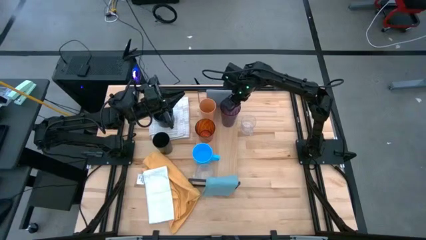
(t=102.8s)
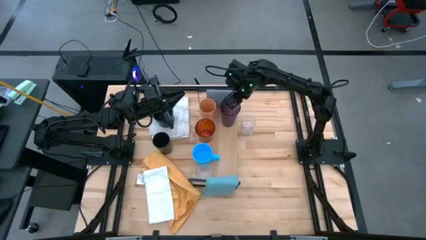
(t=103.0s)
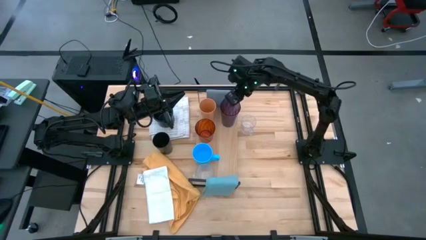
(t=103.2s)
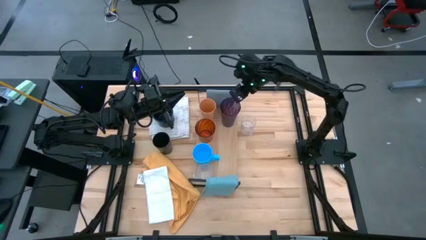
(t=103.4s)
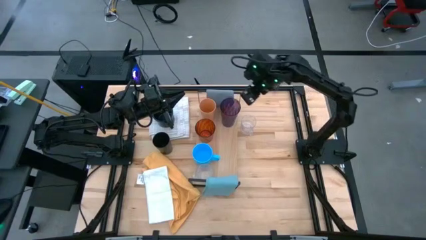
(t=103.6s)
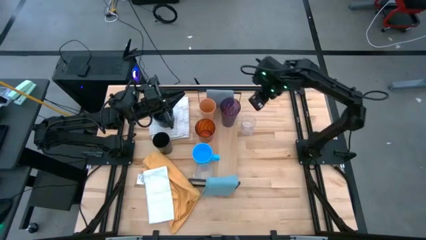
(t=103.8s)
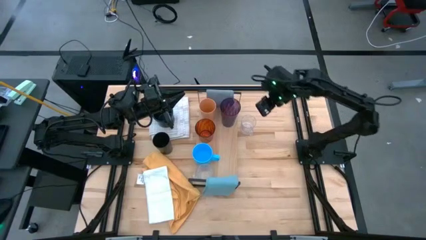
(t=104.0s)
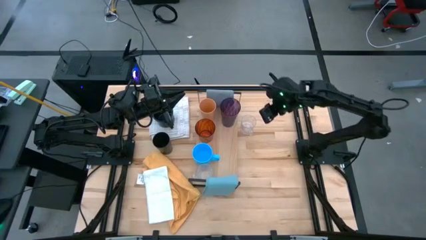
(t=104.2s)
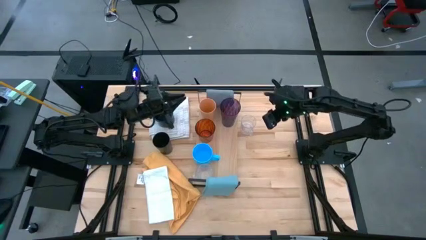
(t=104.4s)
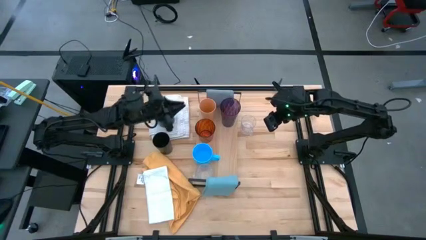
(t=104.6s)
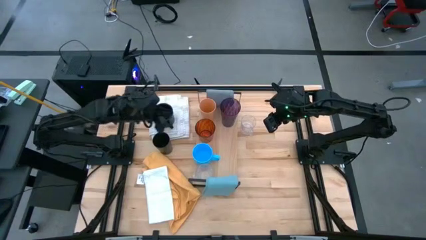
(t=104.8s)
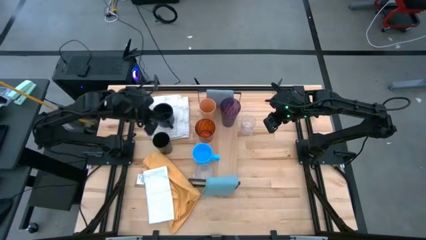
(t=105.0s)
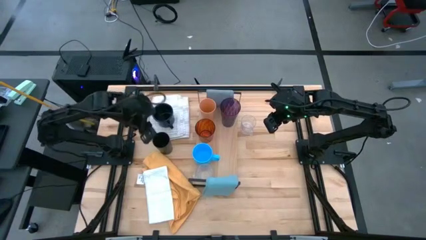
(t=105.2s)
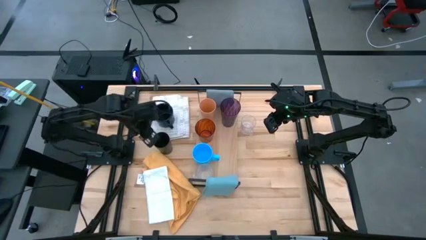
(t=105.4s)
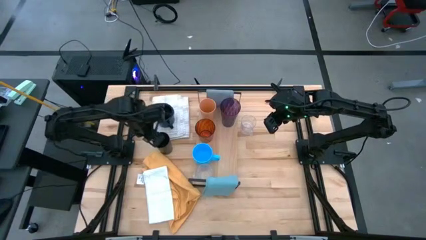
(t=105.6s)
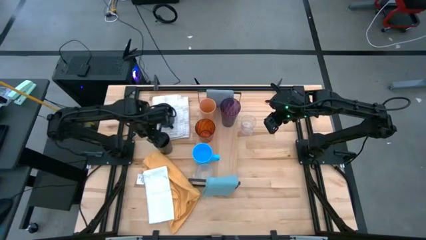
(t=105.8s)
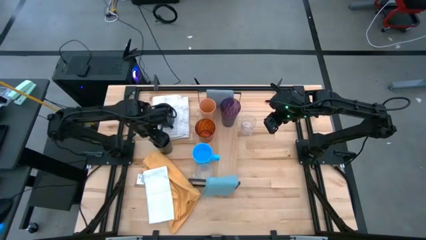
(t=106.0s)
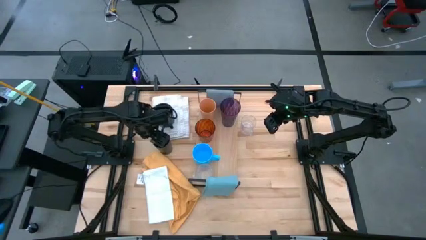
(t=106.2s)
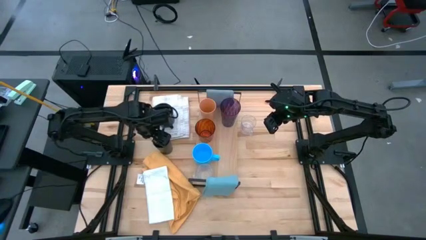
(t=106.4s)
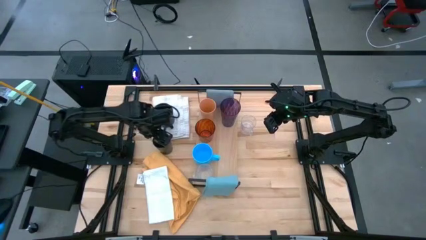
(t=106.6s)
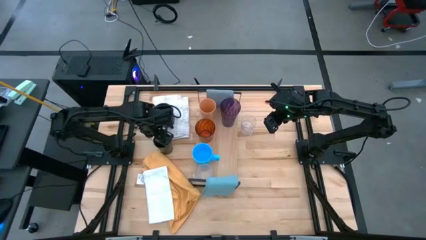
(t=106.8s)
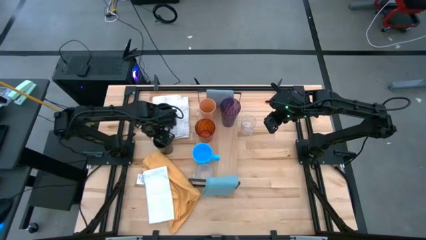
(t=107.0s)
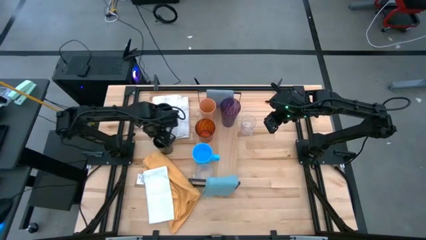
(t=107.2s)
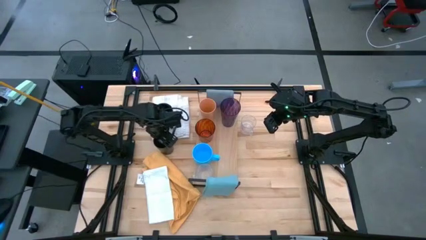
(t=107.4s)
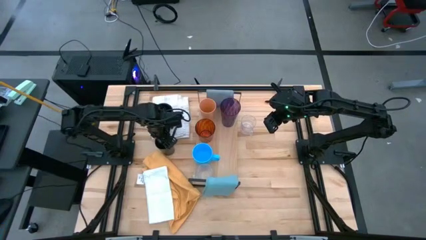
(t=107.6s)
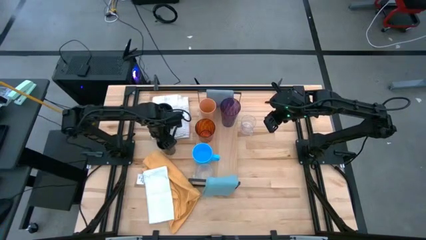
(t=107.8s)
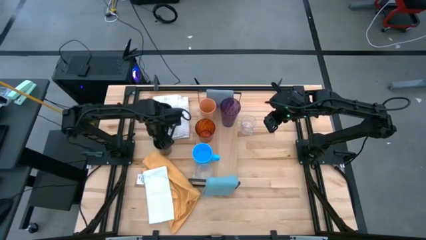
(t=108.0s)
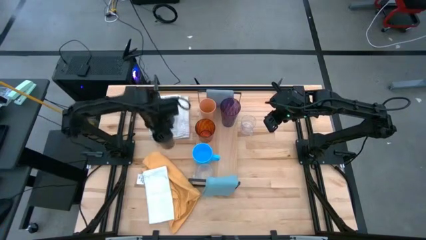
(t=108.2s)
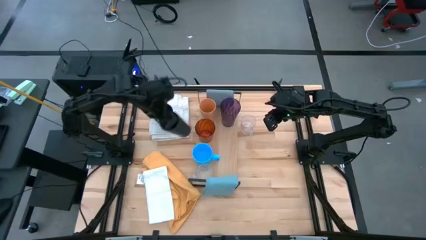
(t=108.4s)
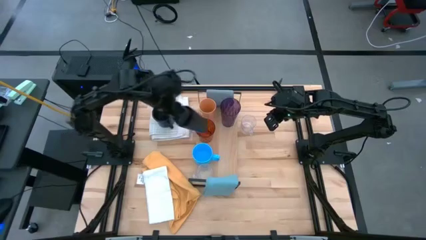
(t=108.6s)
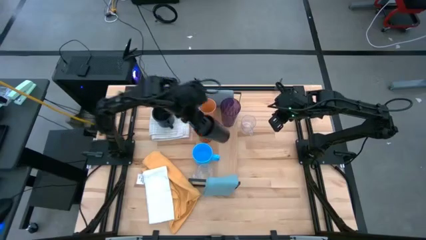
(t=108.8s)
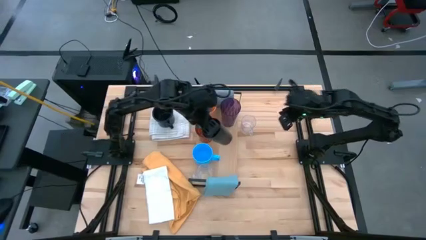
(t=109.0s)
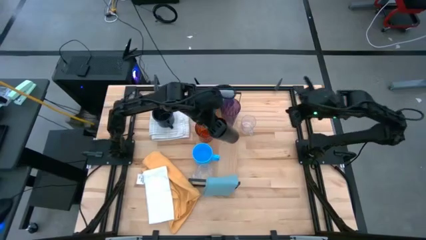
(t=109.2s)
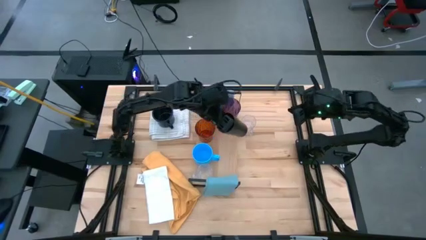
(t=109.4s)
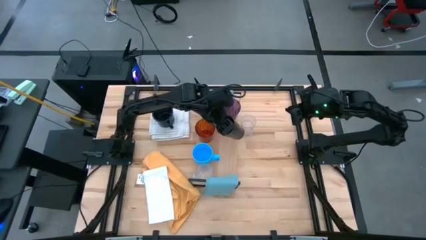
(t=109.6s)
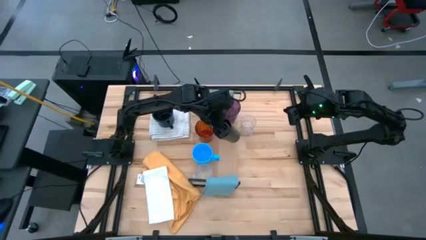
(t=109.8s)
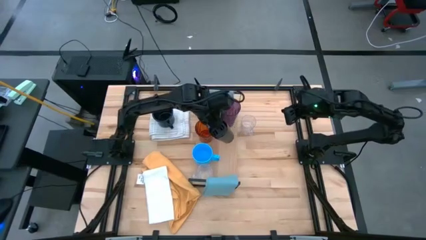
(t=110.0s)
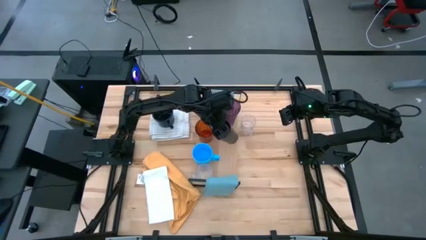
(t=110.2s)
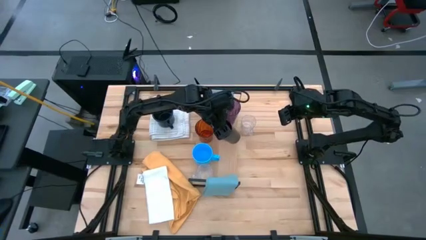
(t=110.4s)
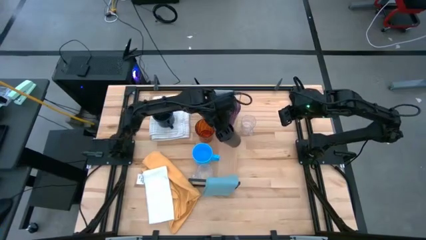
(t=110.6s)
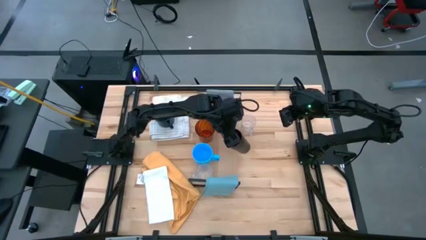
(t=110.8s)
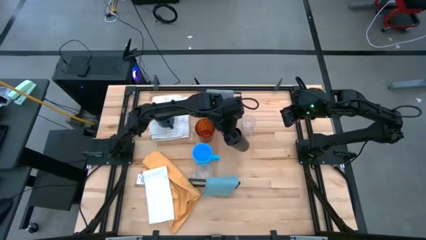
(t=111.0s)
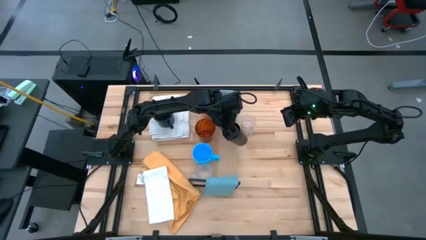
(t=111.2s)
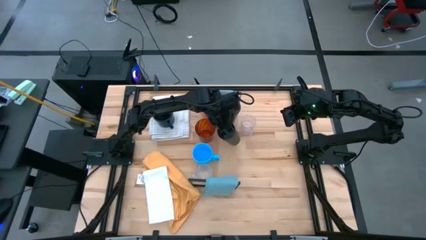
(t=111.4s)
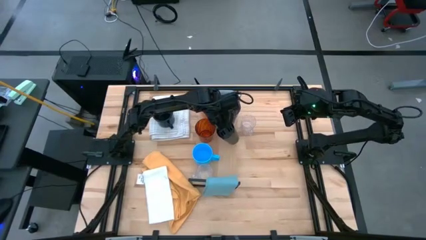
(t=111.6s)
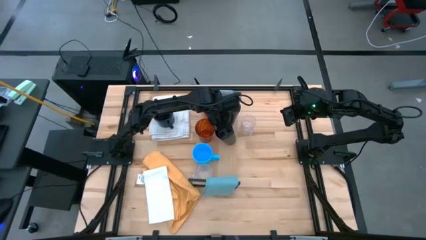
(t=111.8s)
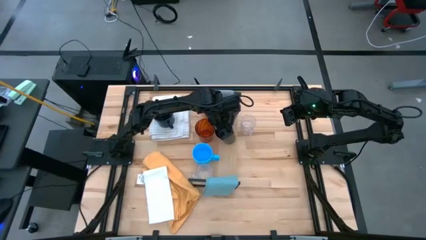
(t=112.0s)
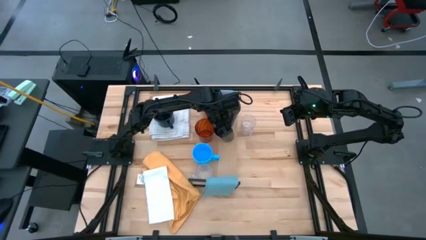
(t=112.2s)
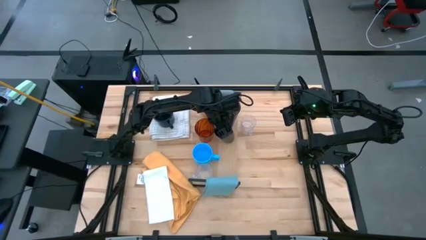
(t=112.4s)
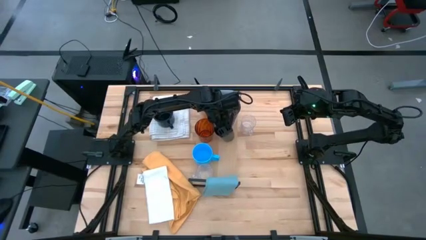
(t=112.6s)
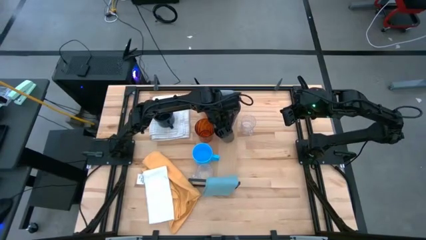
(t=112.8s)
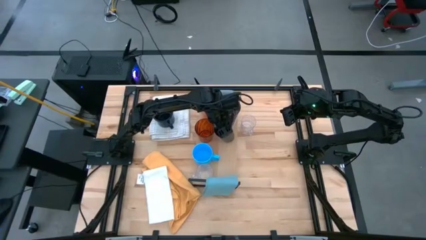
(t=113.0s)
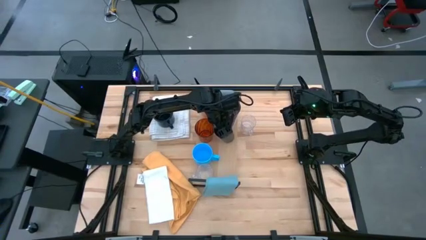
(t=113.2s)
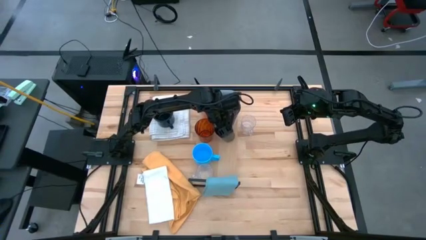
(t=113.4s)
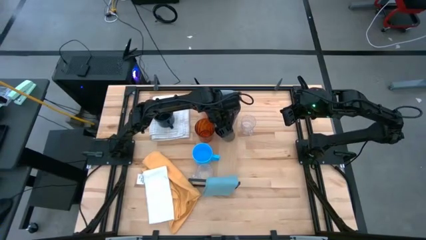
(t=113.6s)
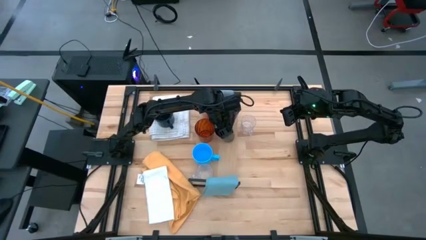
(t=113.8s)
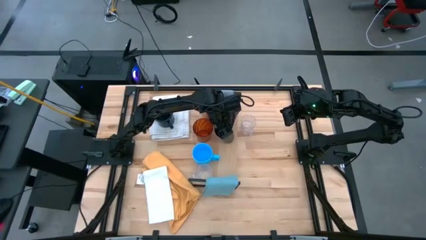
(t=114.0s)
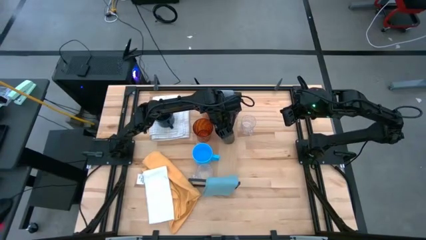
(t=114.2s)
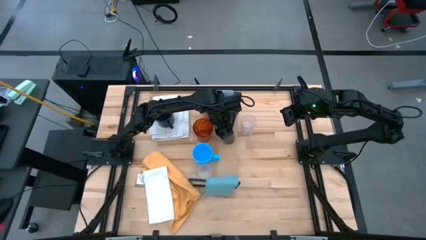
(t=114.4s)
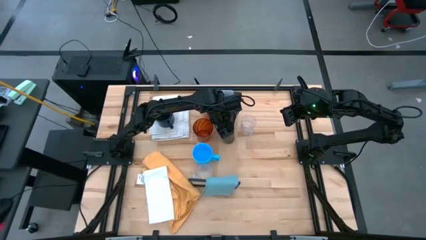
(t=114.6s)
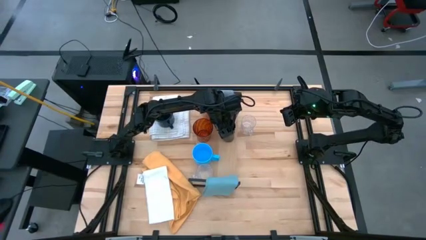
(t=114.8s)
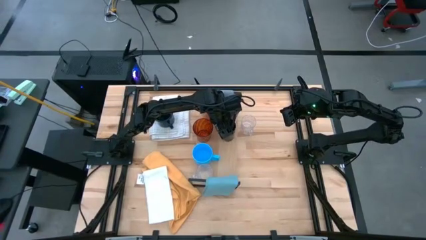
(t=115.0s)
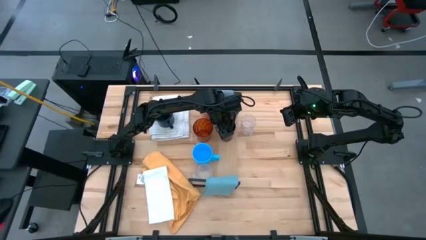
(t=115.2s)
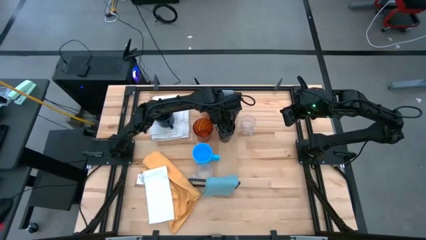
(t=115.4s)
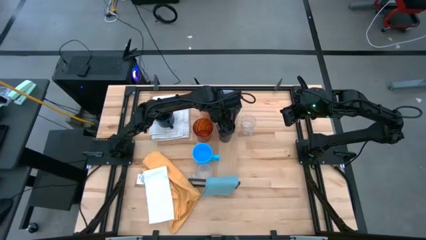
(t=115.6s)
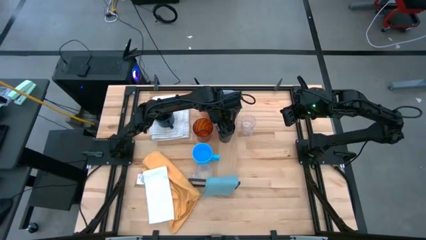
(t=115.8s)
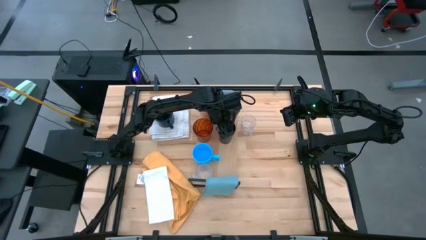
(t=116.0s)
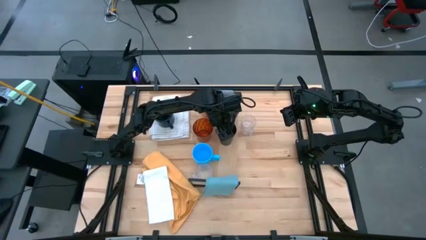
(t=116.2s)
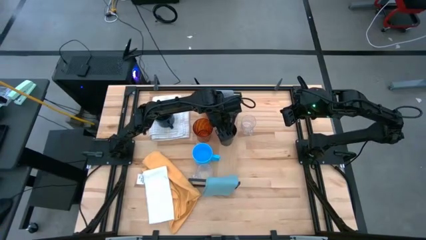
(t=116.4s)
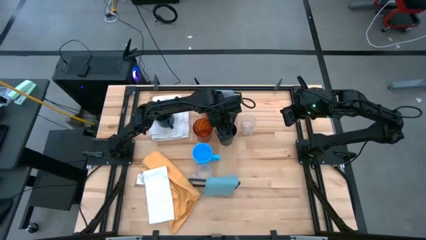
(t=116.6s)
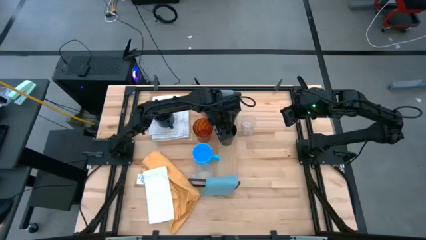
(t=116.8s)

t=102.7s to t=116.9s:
Task: Stack small to large cups/mugs on shelf
Put the black cup on the shelf

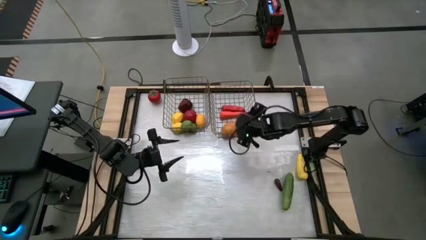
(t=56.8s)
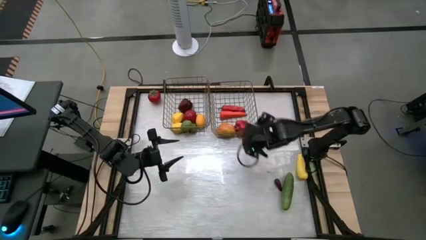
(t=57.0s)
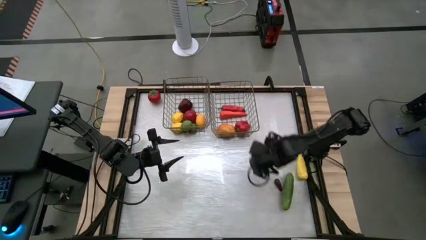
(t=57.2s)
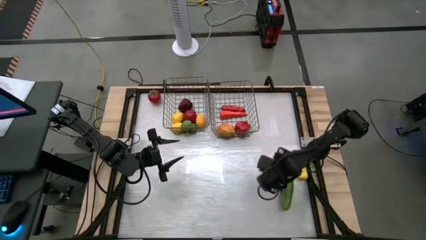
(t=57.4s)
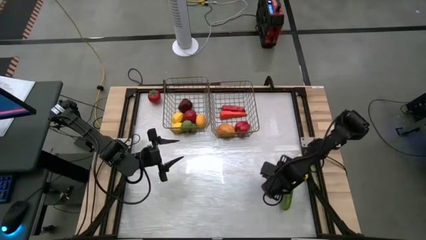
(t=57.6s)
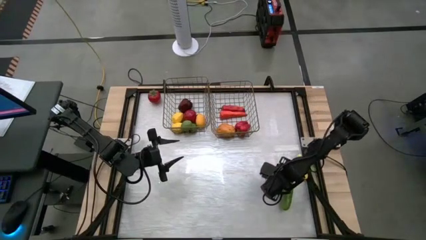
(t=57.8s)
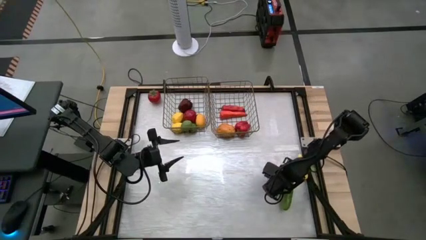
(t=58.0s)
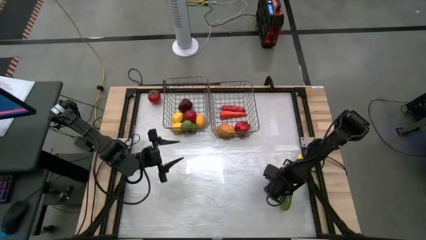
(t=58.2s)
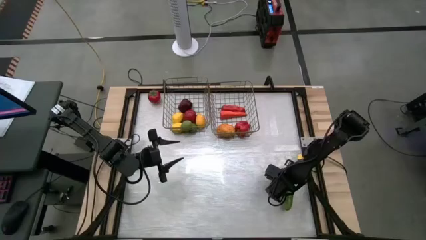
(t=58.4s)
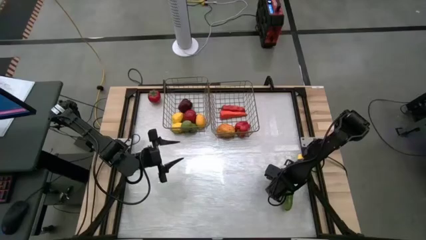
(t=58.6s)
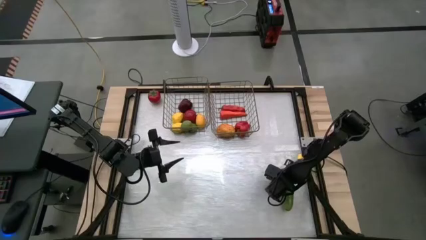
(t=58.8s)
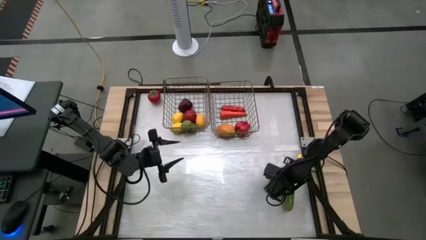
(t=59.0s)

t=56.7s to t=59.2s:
Task: Sort produce into baskets
Put the eggplant into the right wire basket
